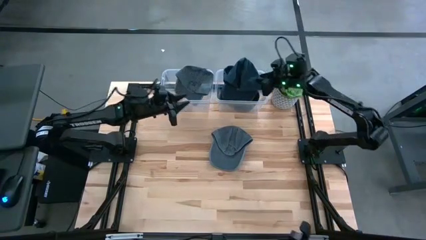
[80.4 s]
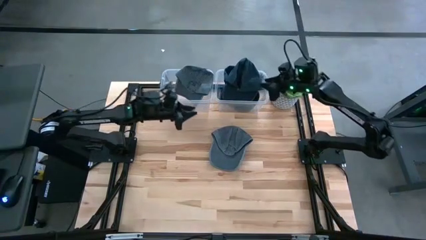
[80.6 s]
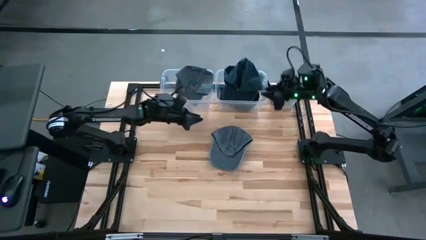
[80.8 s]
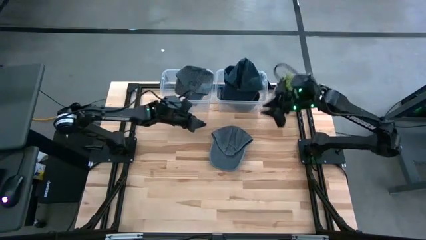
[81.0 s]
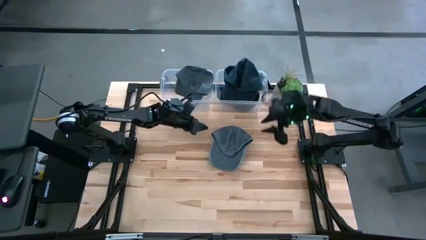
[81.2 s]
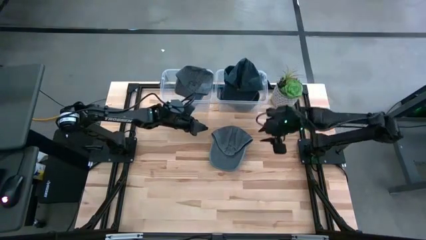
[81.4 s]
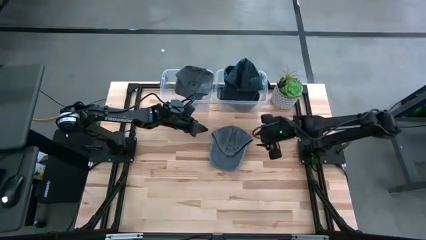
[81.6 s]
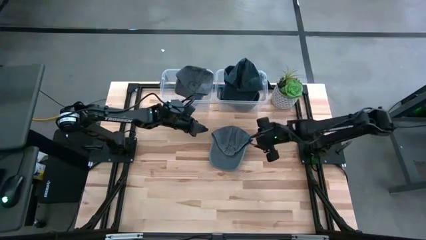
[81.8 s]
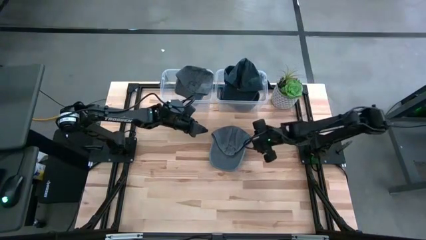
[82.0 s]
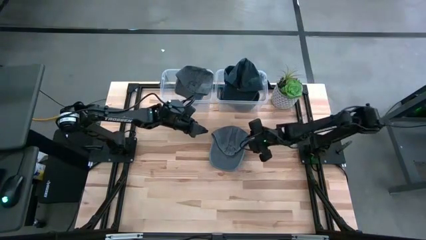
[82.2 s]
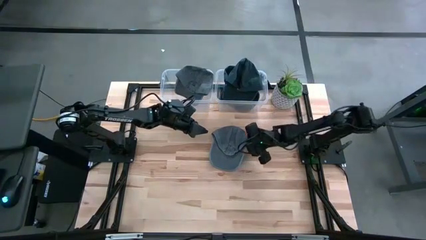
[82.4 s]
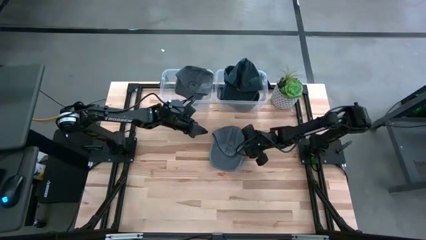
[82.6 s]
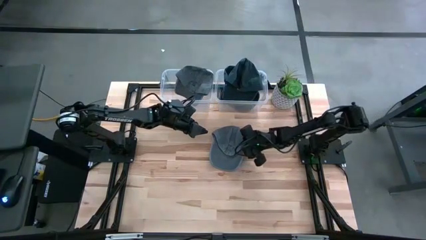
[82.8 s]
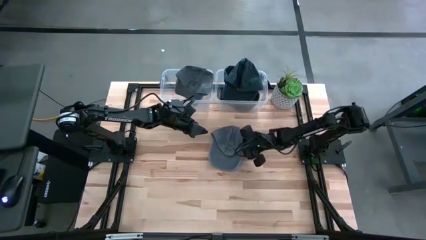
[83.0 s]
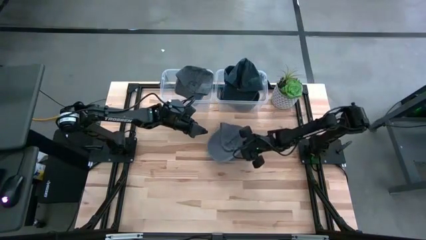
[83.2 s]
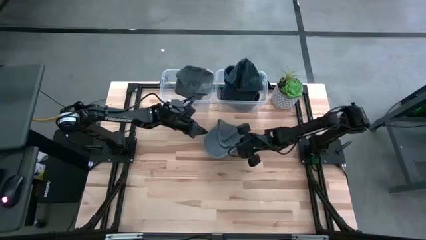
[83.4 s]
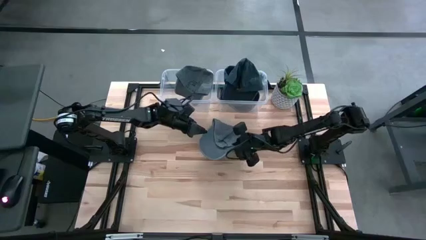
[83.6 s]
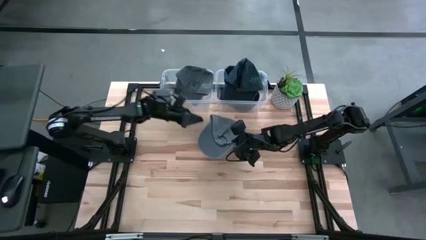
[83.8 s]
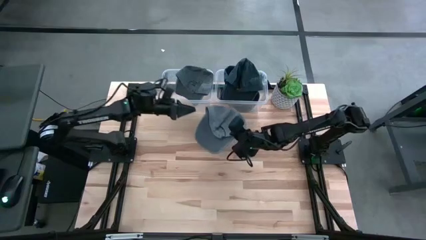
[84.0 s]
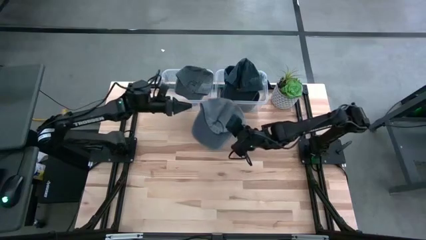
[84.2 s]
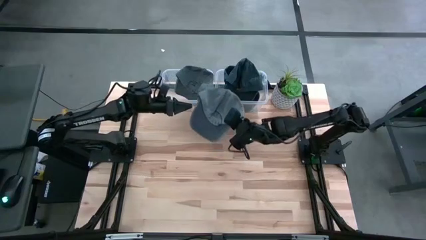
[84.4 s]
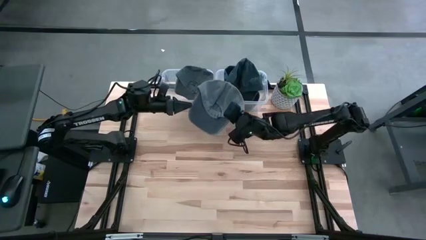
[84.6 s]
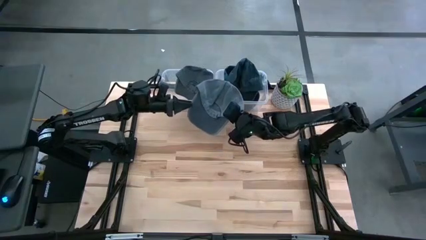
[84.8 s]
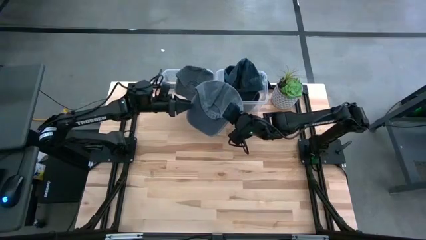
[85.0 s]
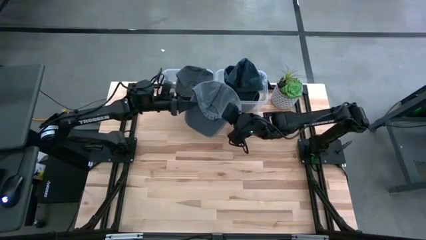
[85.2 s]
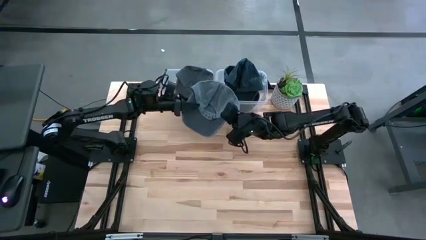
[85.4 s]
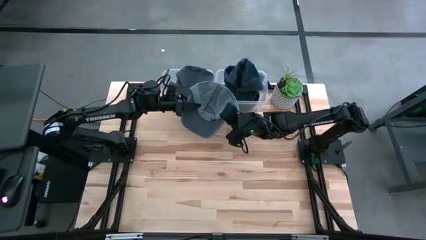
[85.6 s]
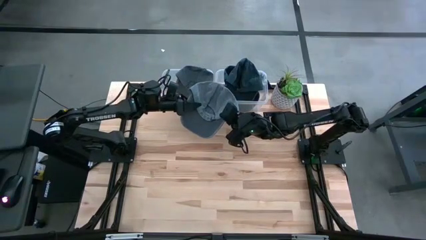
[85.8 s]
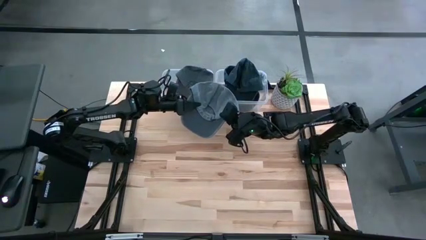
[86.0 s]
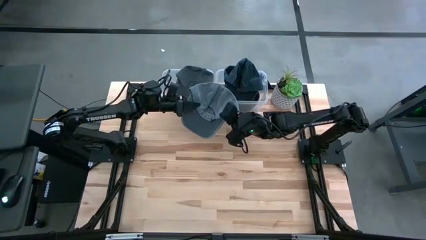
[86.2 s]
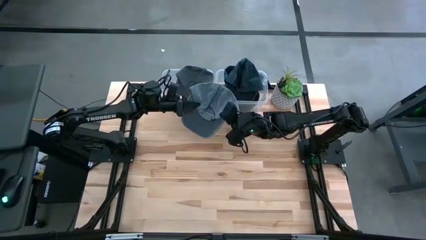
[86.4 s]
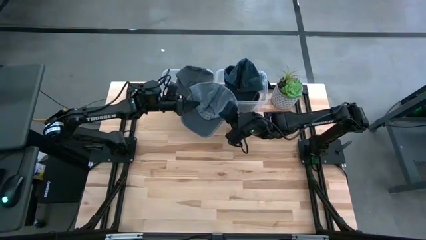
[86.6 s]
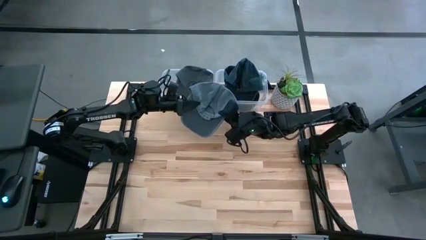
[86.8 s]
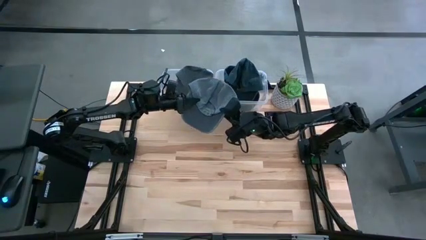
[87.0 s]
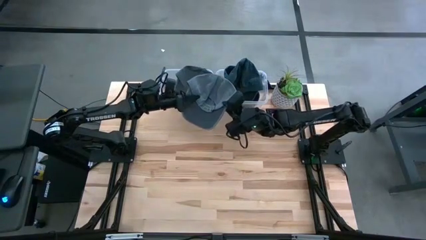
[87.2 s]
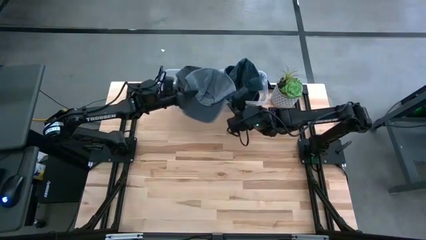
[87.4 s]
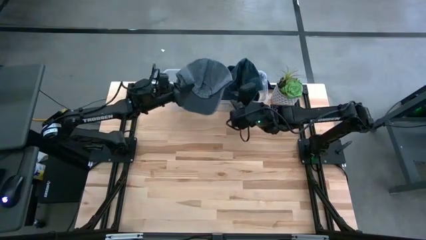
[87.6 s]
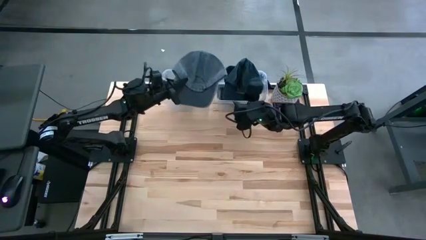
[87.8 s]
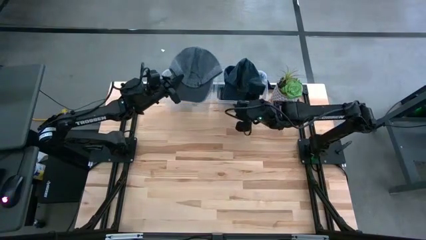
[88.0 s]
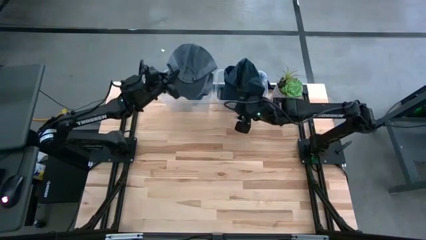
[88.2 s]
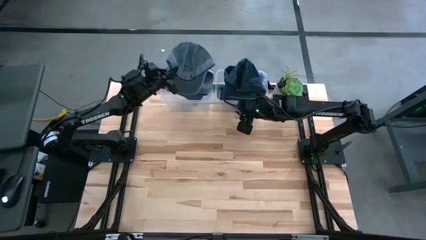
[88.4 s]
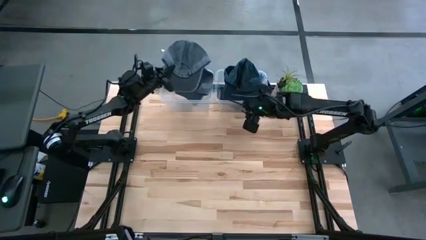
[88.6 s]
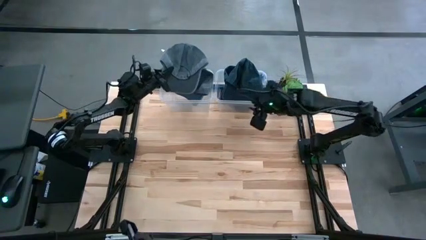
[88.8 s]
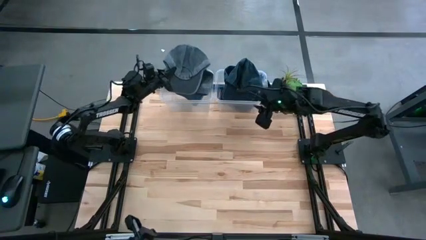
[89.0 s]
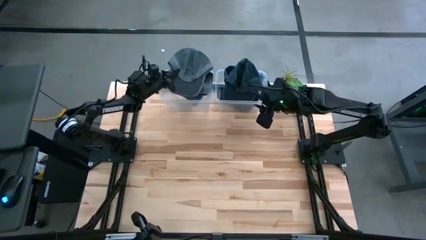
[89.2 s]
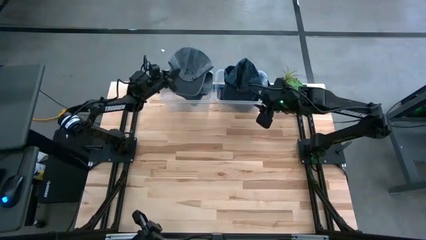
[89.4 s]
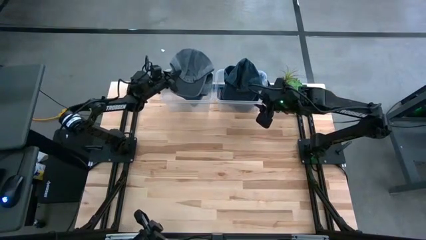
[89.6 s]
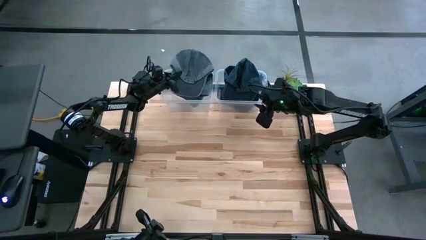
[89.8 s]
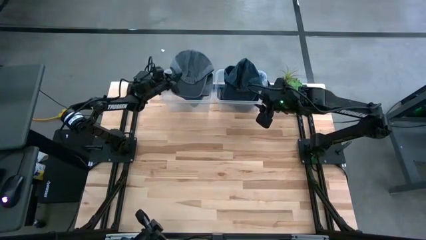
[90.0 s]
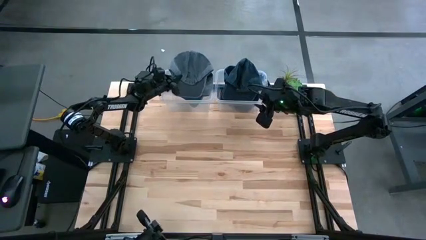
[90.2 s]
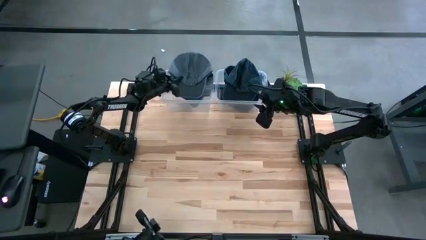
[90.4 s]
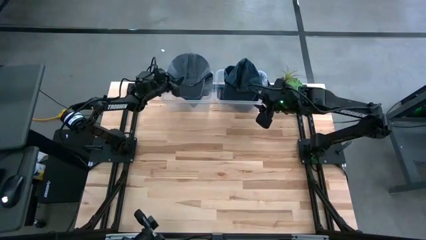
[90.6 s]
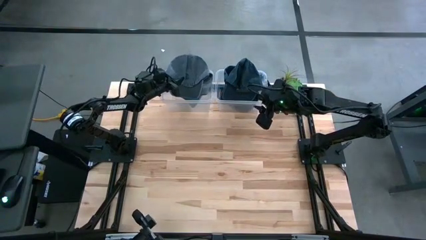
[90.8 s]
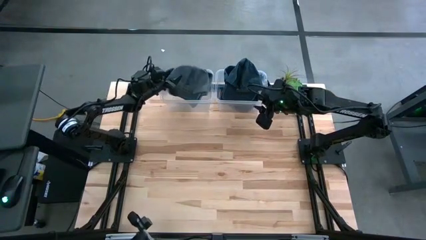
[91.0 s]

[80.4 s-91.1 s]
Task: Pick & Place hat
Put the gray cap into the left transparent bin

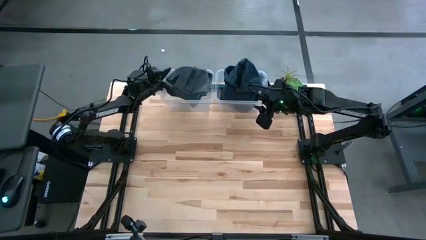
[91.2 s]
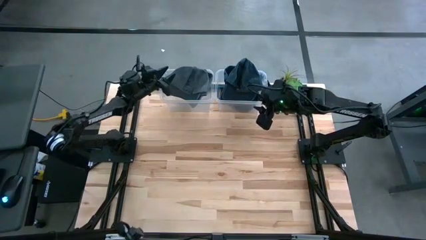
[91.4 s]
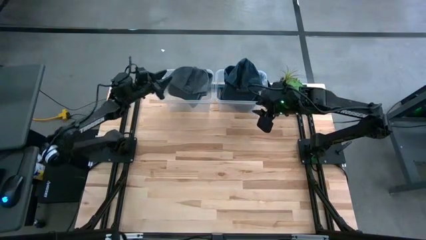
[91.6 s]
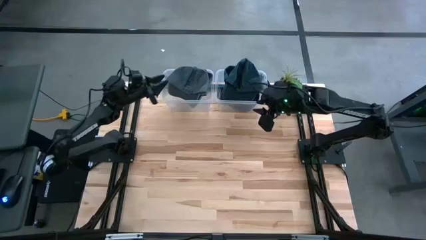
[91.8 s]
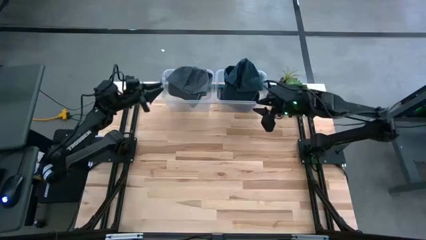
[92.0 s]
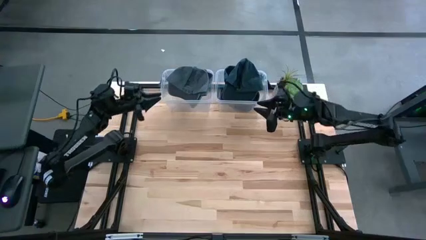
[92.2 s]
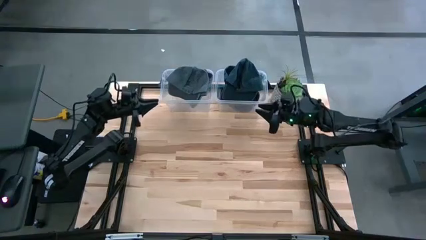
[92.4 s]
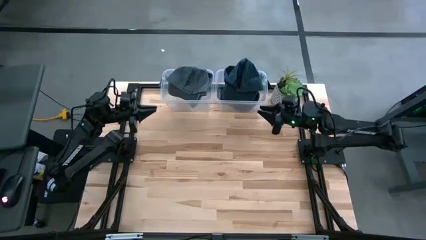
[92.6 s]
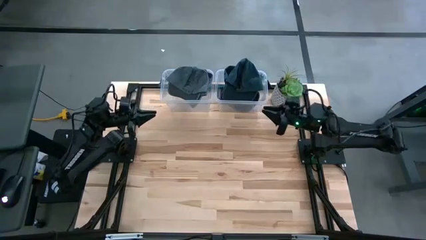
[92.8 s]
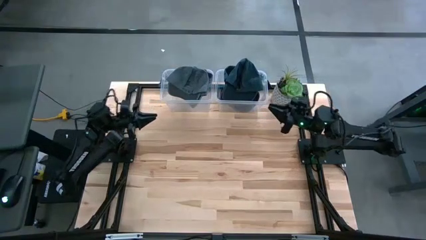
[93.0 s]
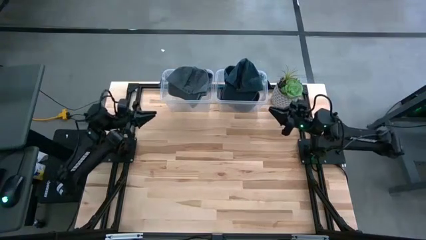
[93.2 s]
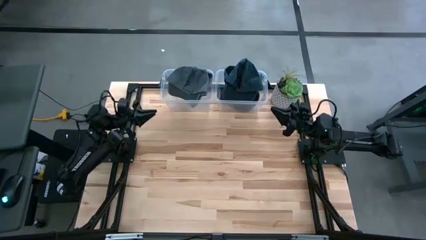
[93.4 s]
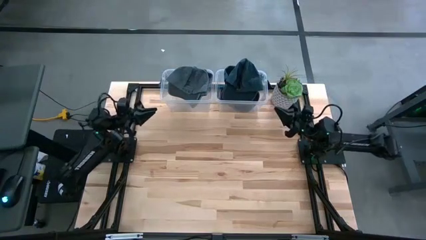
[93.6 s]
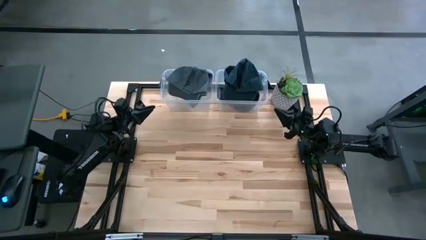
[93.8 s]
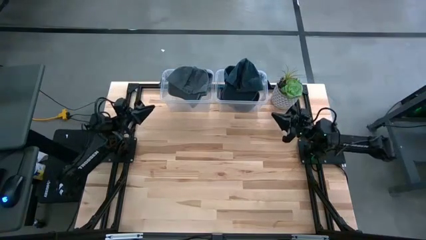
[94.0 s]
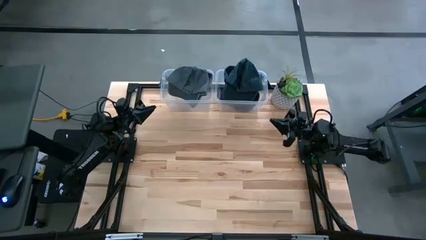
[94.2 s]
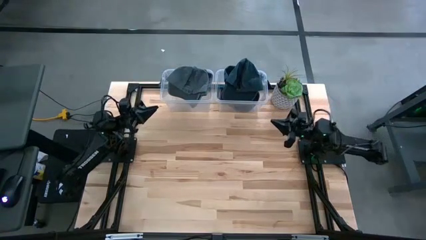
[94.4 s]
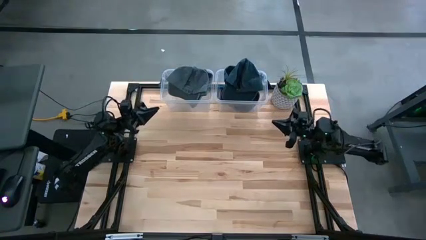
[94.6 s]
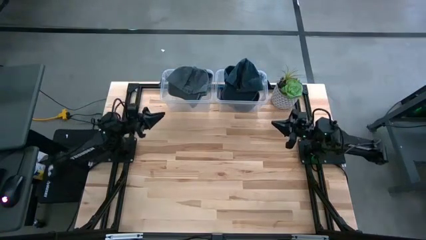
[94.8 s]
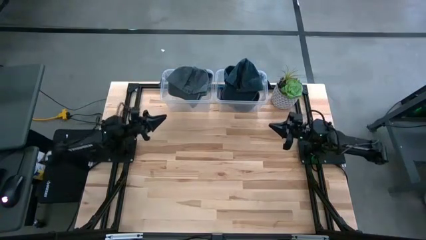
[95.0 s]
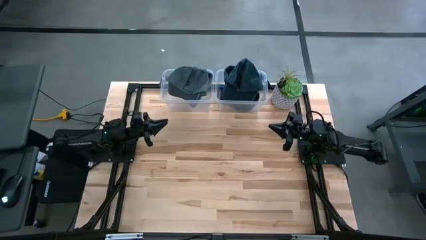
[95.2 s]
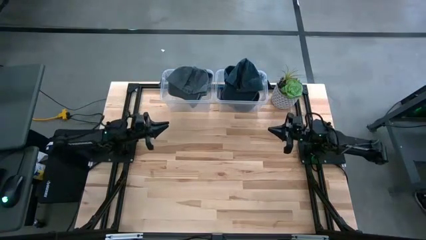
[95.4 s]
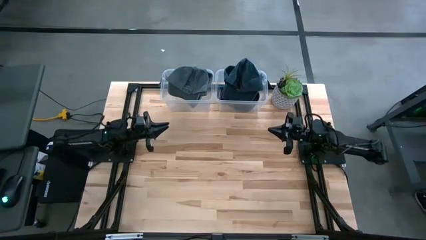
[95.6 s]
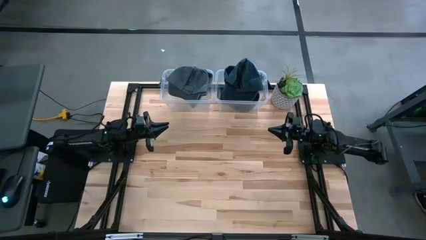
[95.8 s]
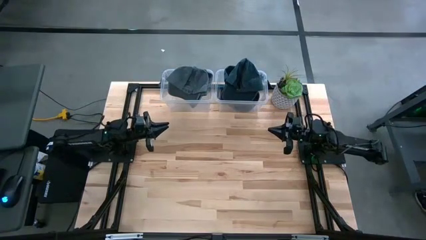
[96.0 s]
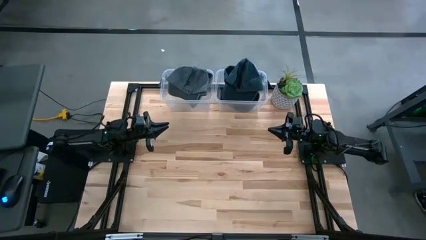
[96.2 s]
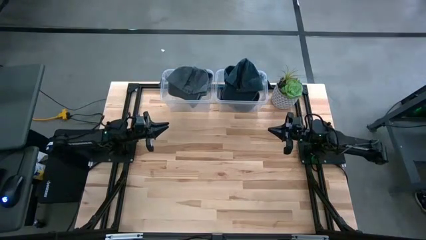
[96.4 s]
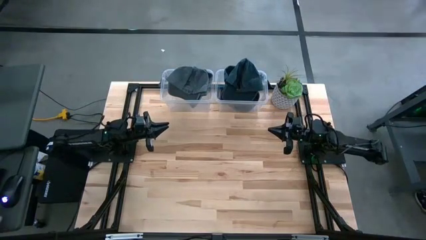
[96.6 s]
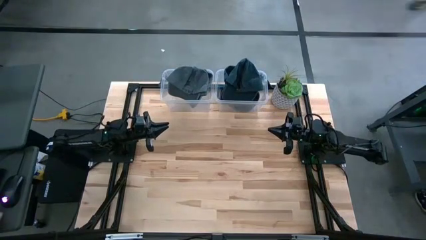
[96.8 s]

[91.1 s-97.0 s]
Return to Home Position
